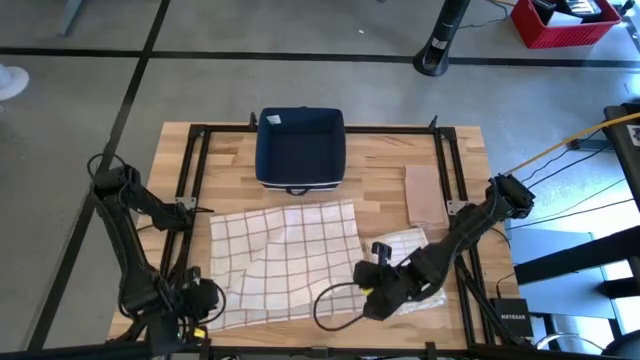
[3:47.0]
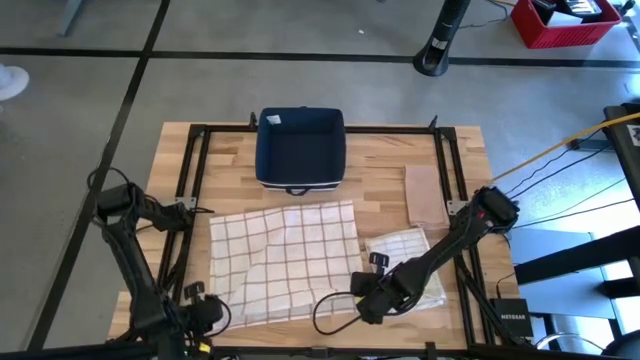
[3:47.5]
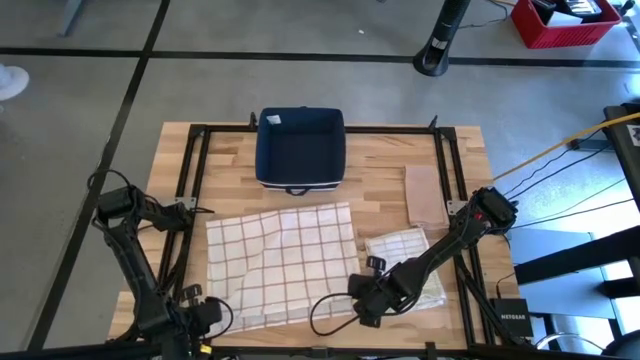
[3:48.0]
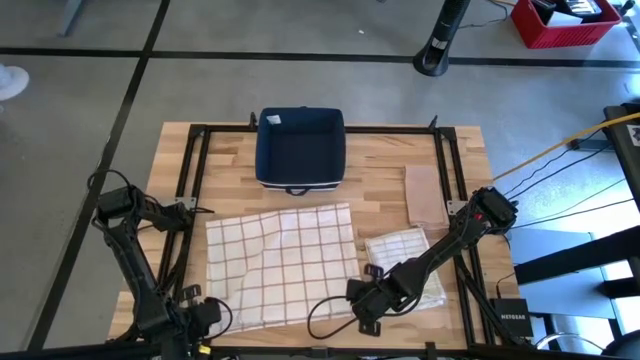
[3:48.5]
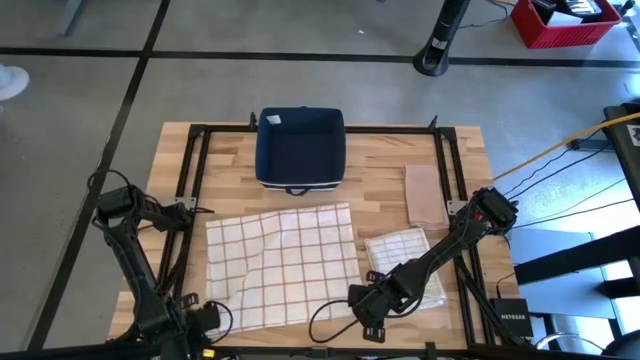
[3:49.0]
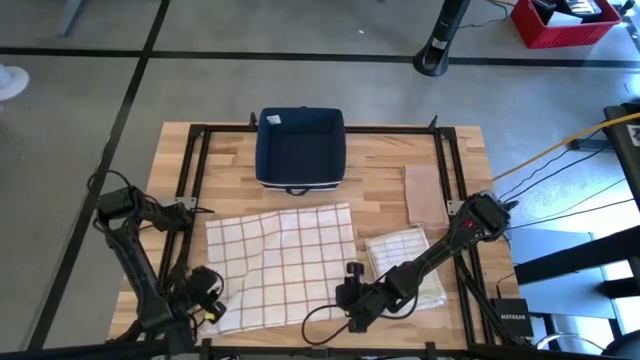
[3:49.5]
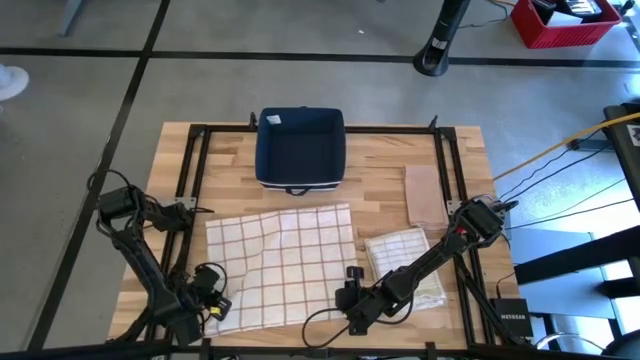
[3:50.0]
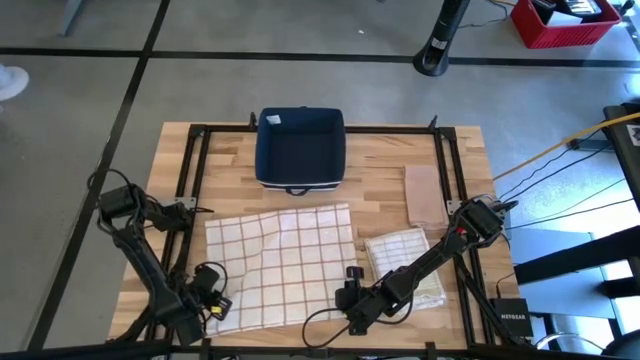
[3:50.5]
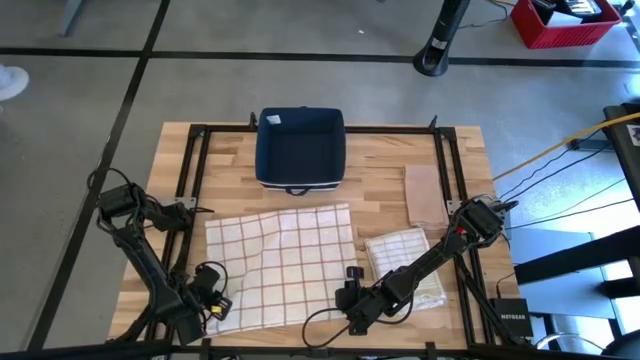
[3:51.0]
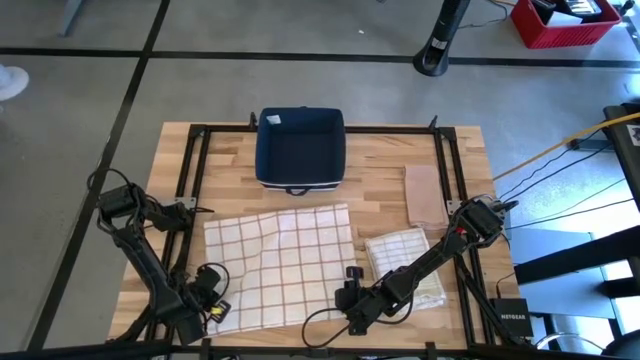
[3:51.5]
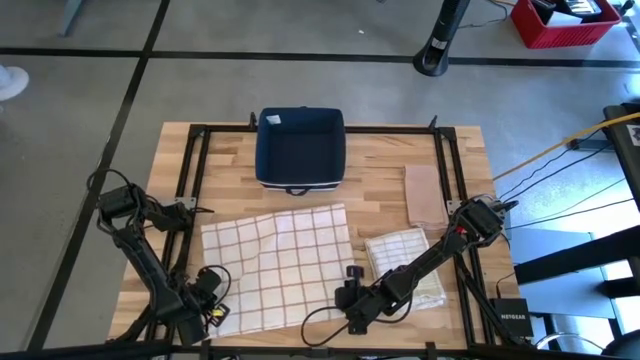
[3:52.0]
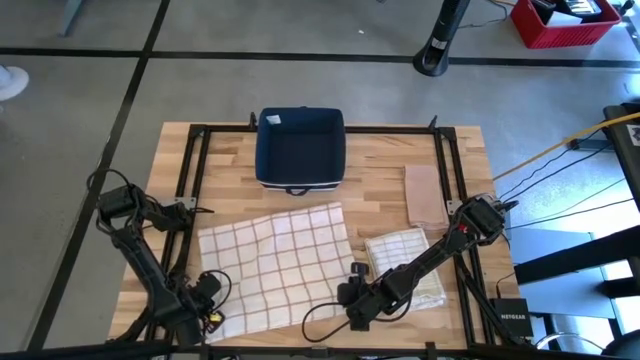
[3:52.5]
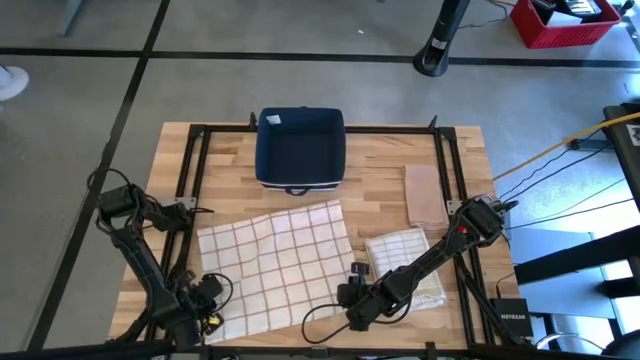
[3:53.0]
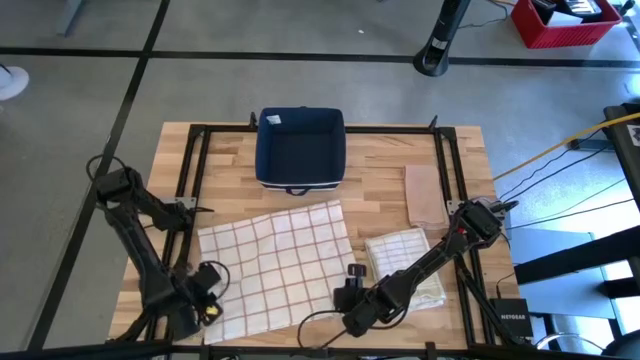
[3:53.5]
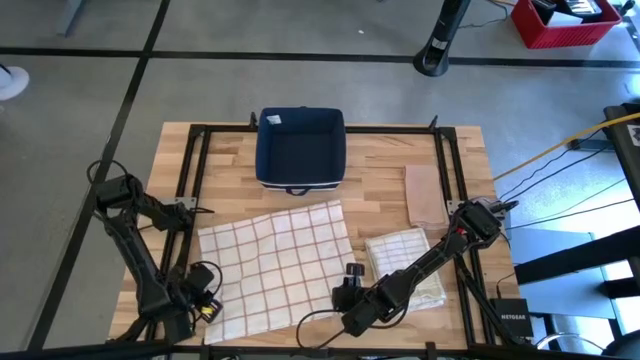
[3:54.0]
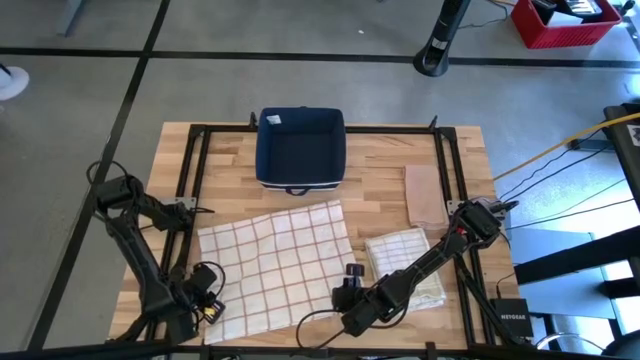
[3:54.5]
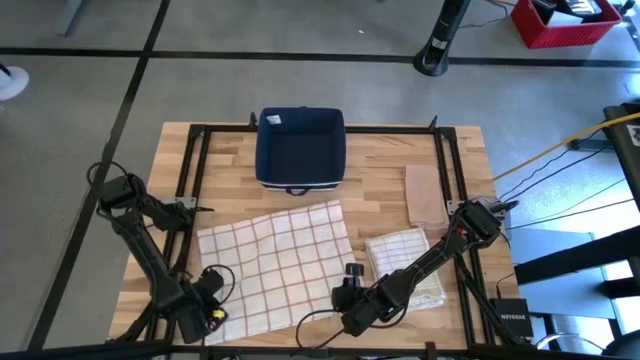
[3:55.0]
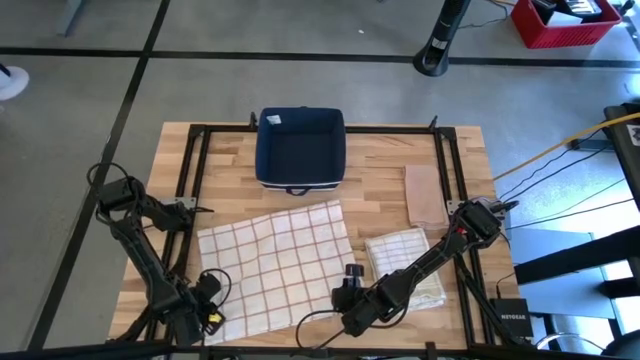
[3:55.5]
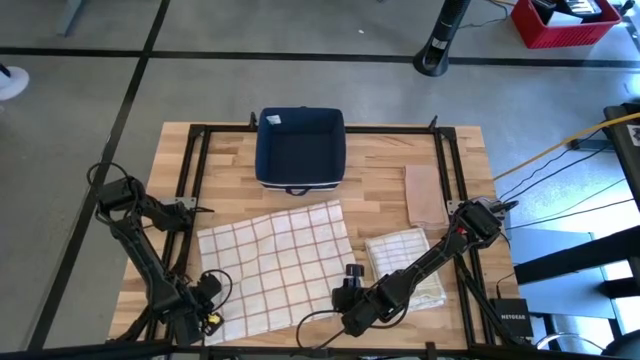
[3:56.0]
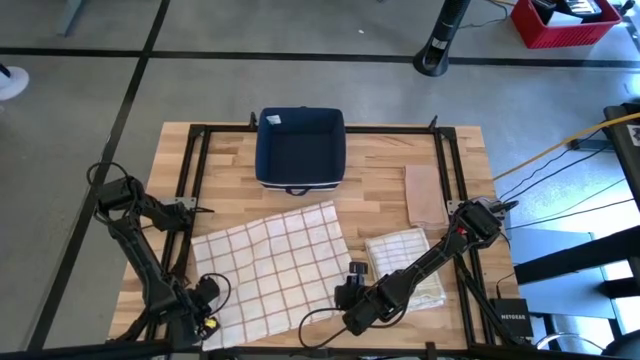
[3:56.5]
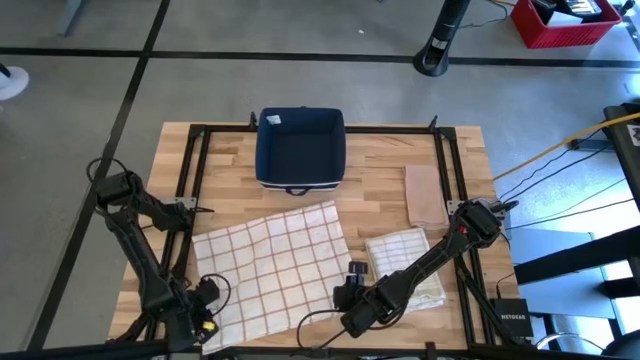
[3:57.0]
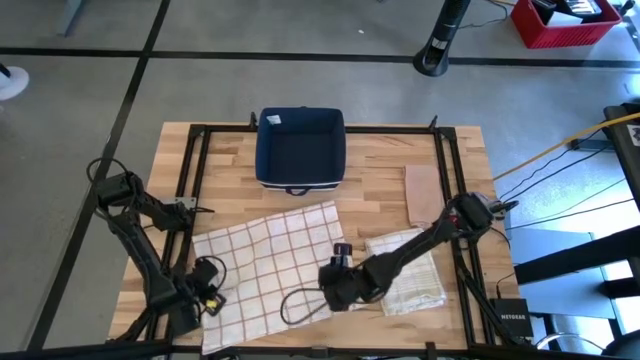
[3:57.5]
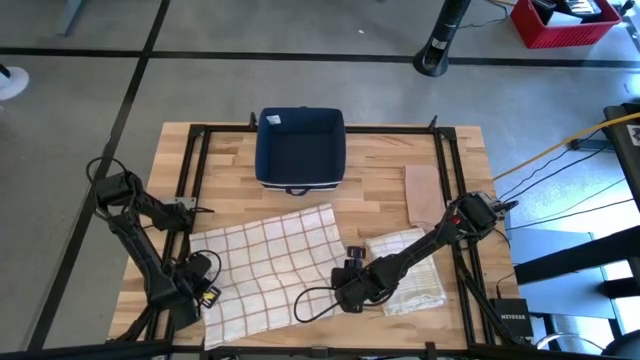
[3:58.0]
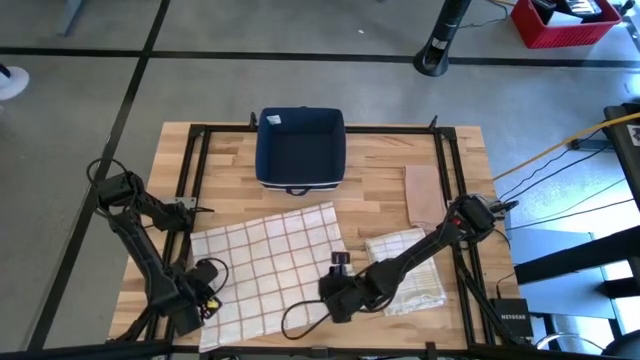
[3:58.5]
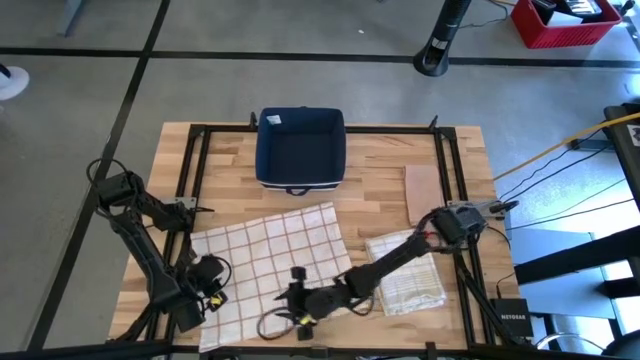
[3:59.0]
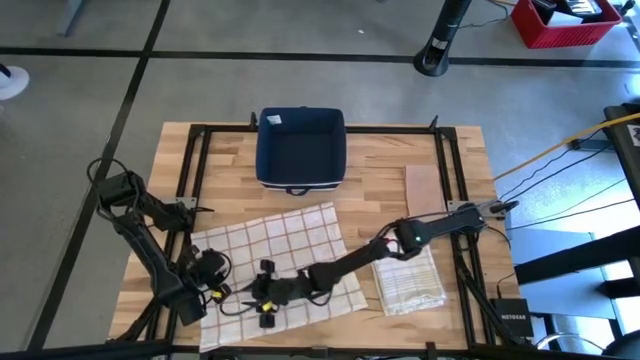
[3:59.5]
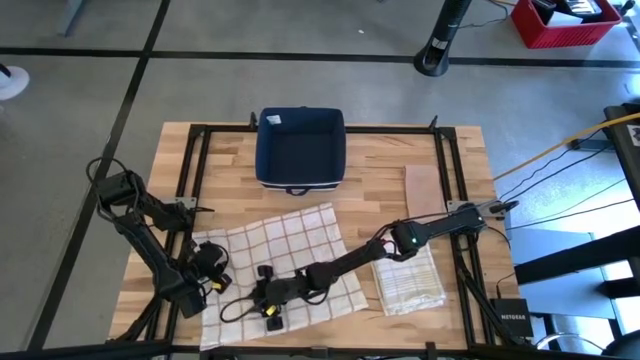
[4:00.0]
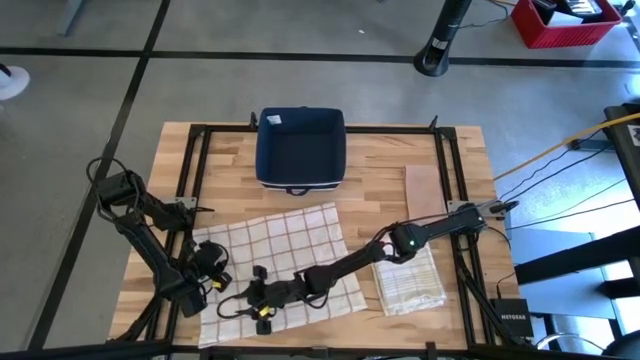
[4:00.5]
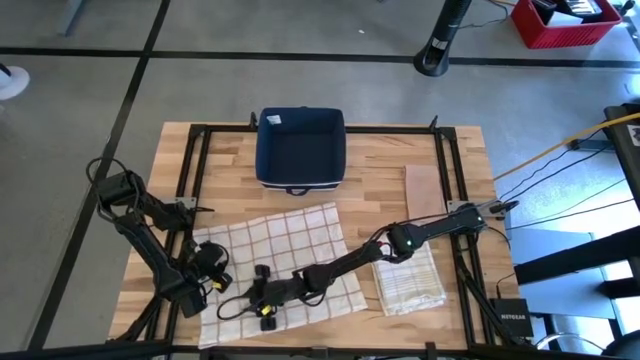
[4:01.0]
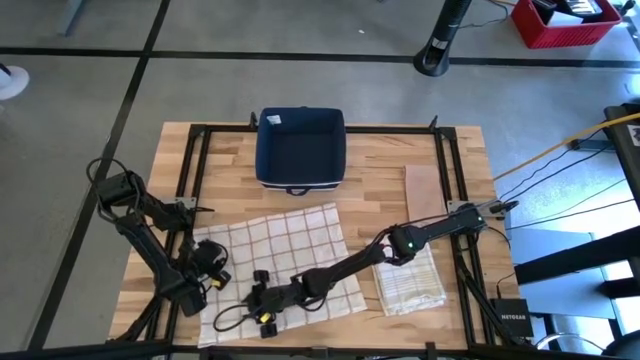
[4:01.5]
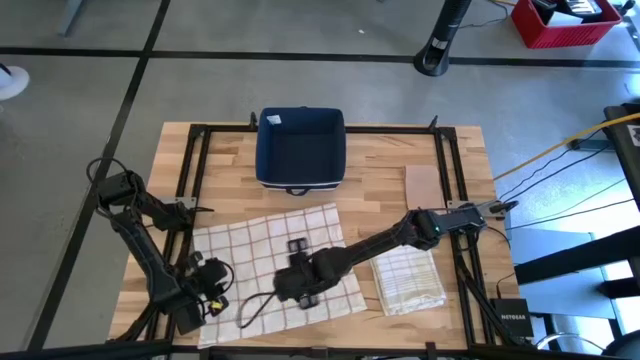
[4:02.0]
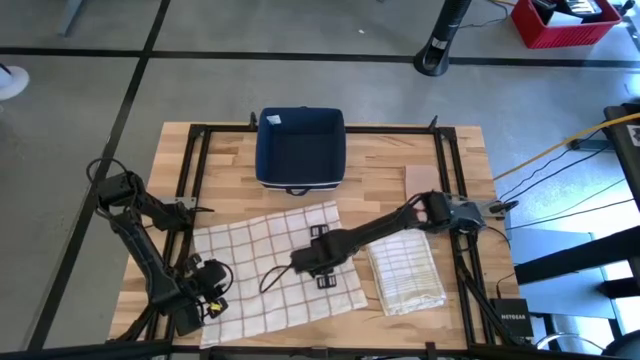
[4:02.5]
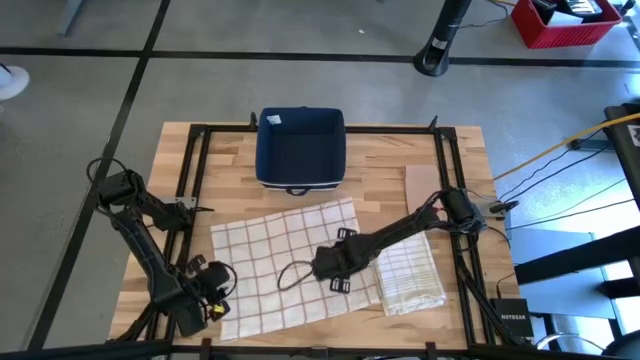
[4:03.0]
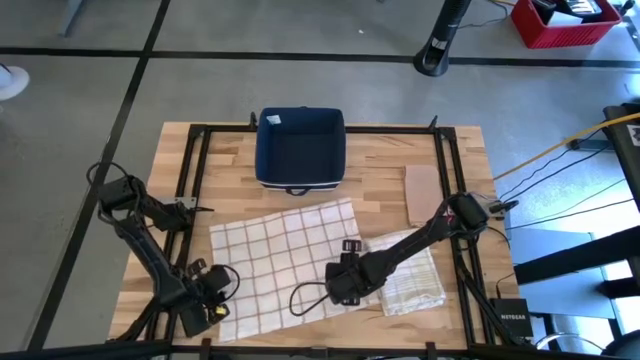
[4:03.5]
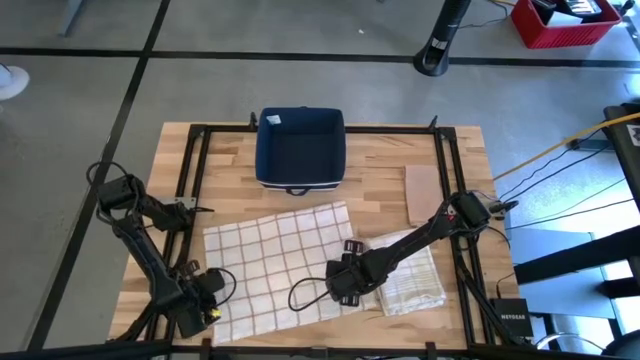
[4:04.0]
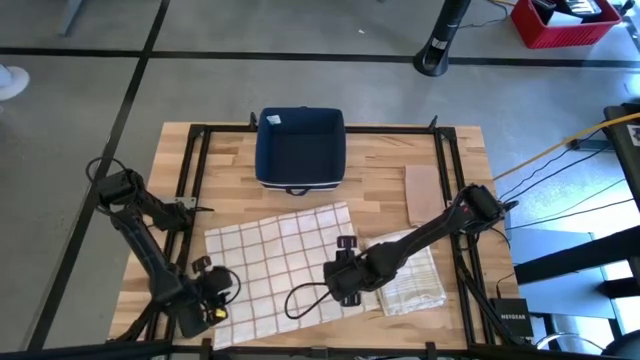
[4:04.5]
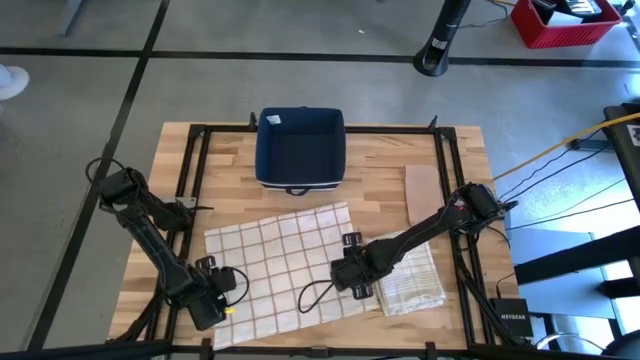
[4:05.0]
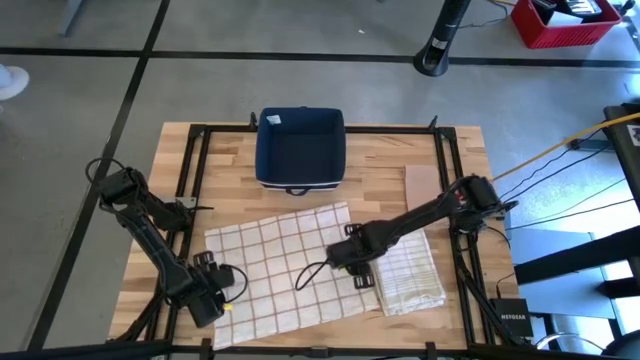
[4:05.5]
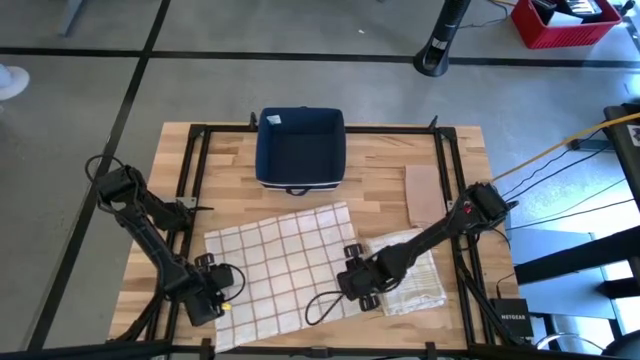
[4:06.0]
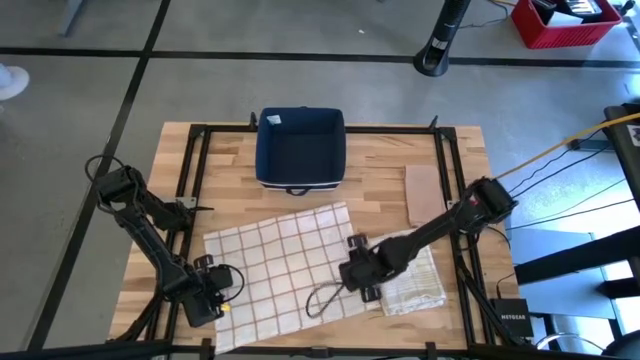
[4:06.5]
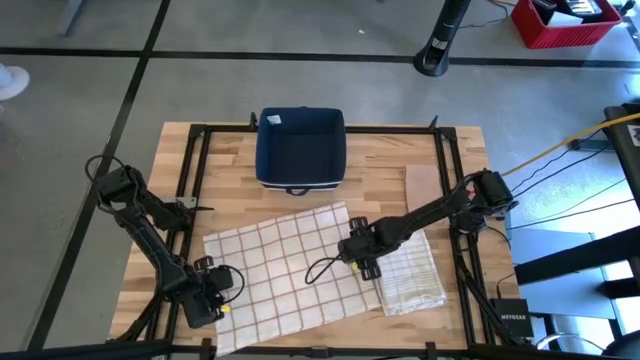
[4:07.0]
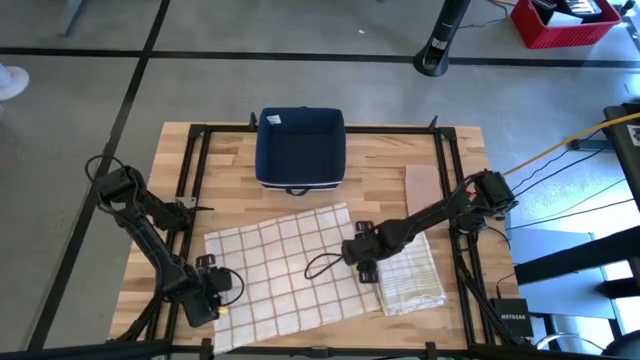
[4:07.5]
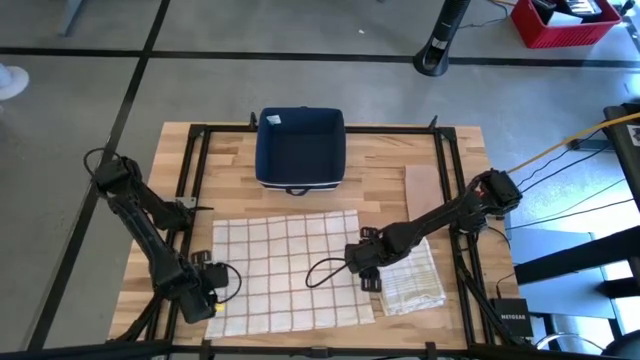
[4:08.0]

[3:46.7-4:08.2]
Task: Fold towel
Fold the white with brown pattern towel on the table
